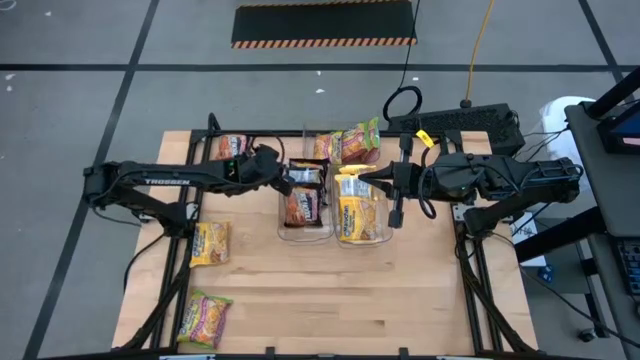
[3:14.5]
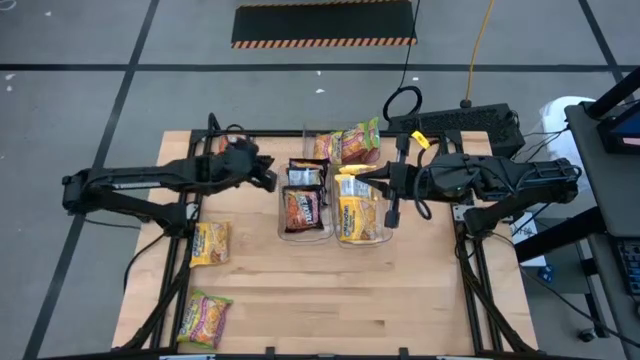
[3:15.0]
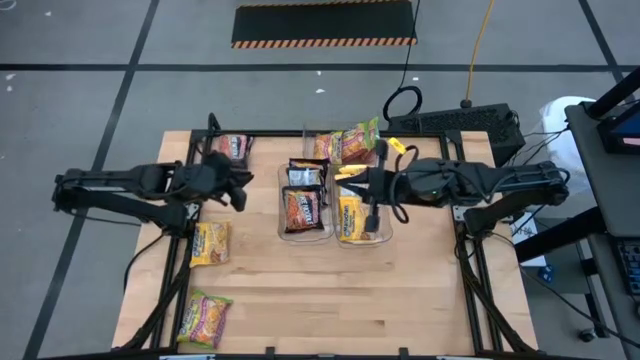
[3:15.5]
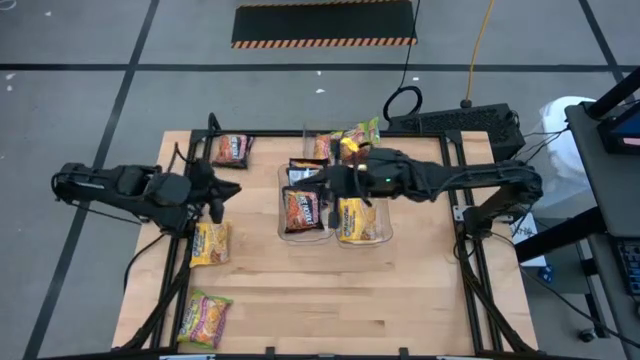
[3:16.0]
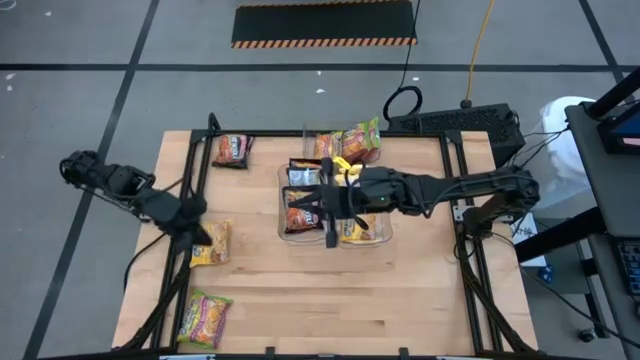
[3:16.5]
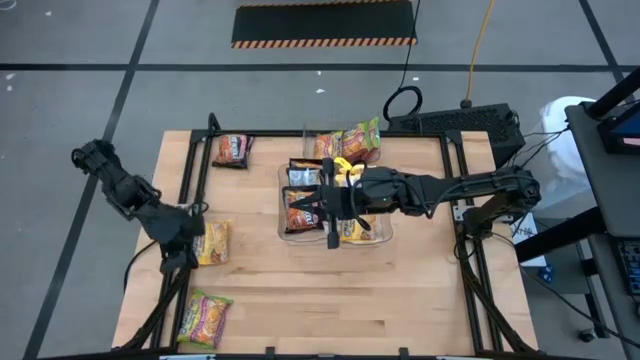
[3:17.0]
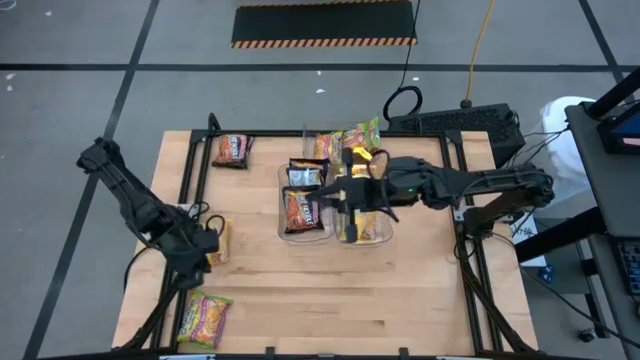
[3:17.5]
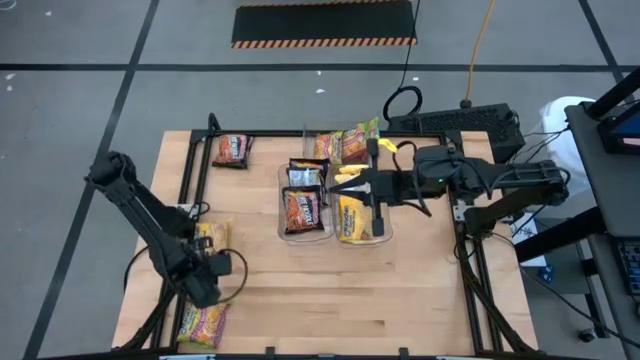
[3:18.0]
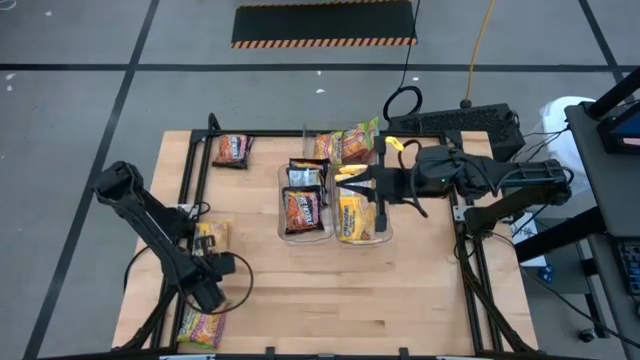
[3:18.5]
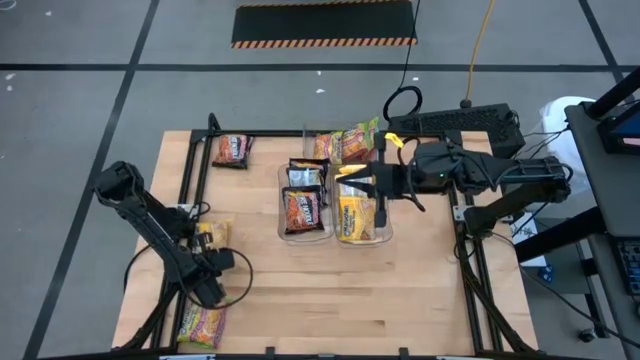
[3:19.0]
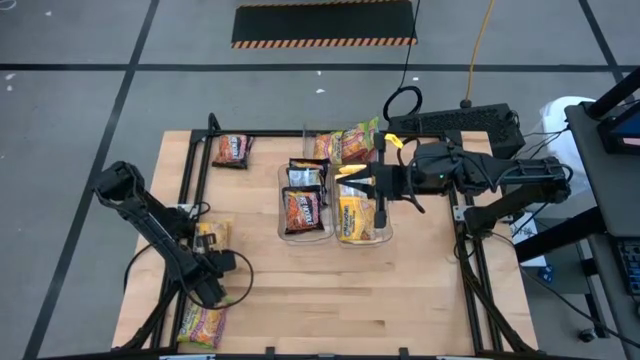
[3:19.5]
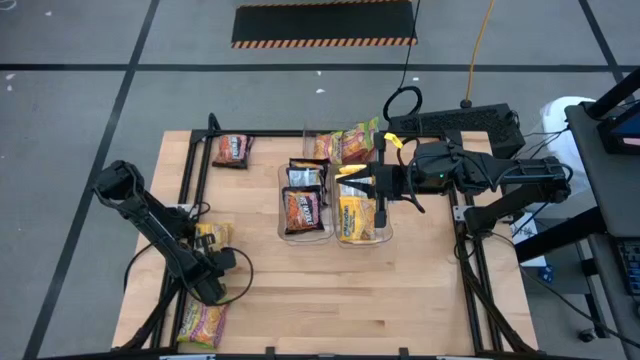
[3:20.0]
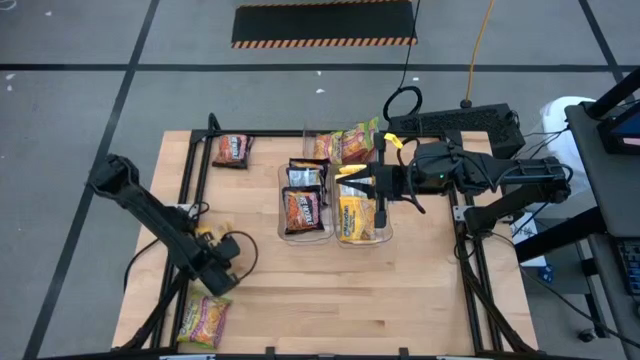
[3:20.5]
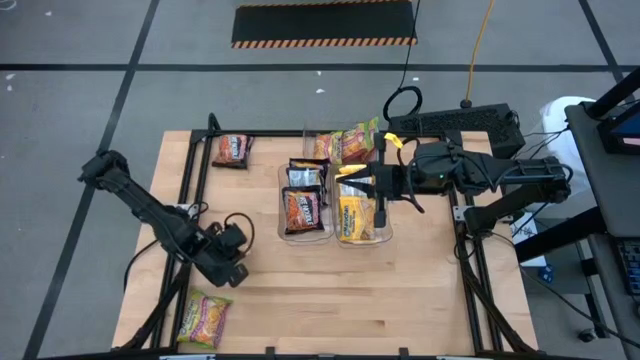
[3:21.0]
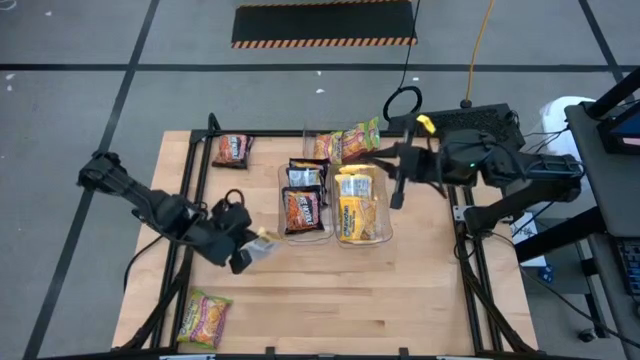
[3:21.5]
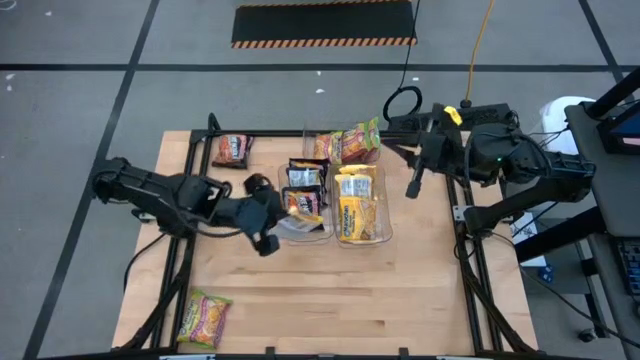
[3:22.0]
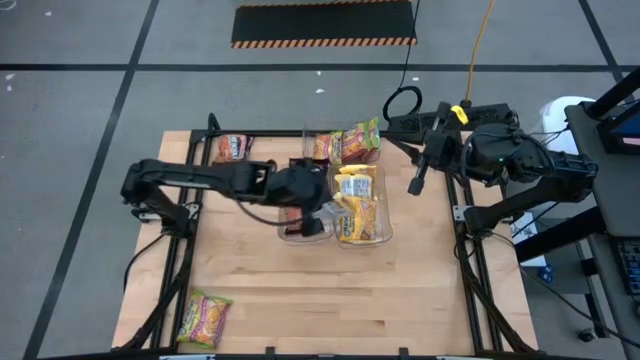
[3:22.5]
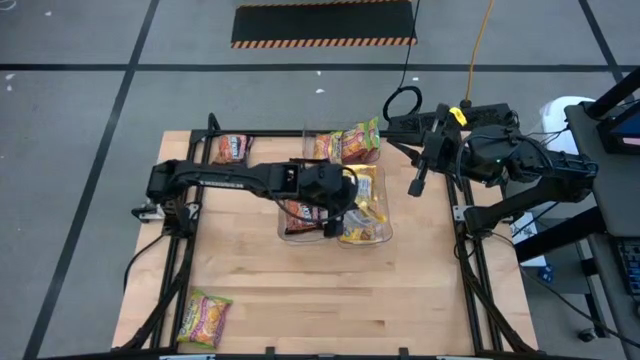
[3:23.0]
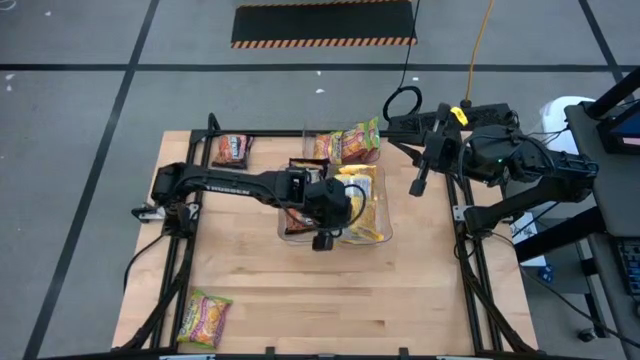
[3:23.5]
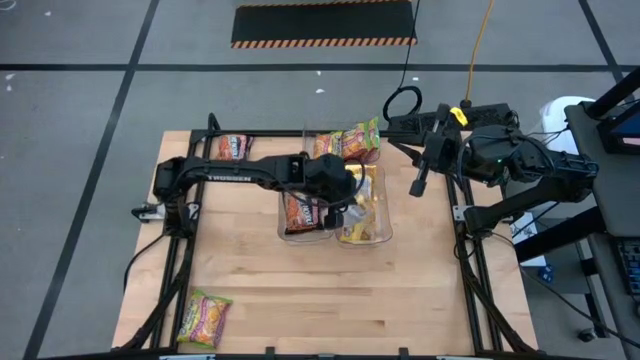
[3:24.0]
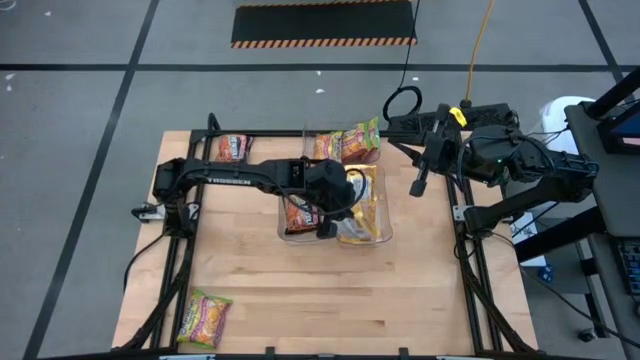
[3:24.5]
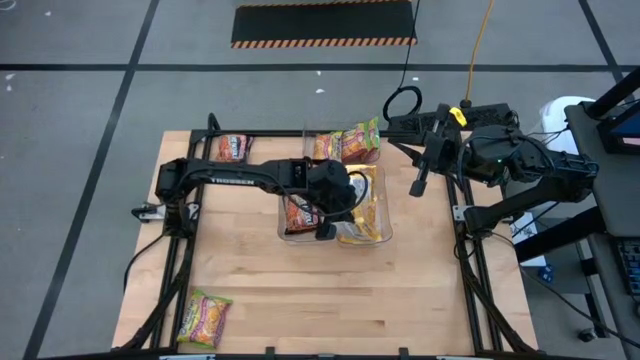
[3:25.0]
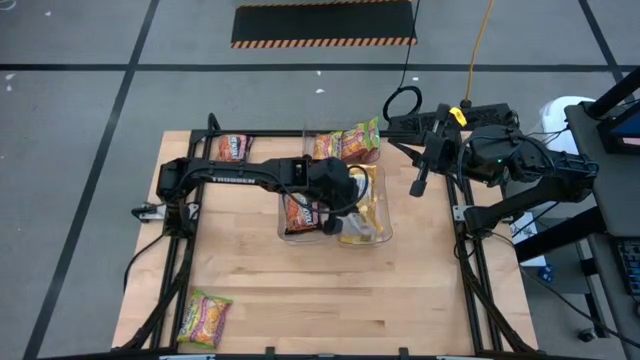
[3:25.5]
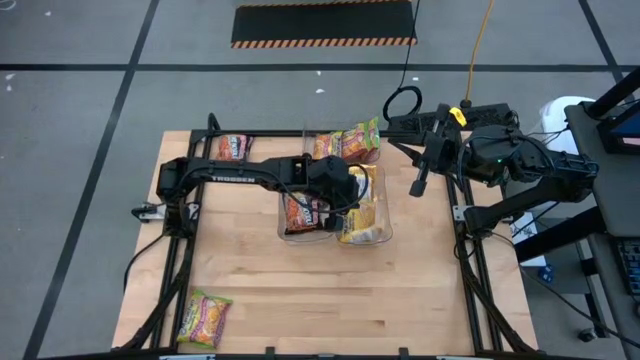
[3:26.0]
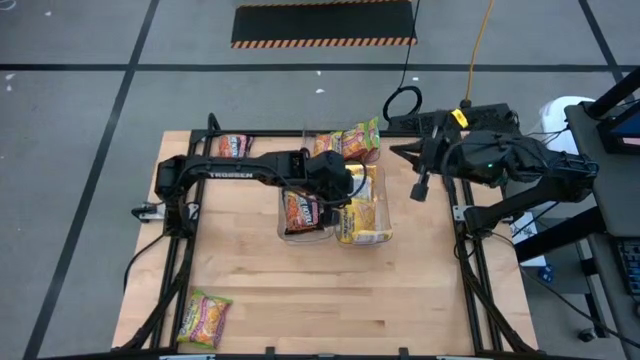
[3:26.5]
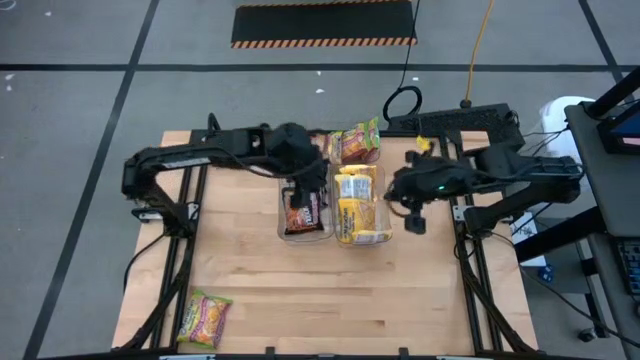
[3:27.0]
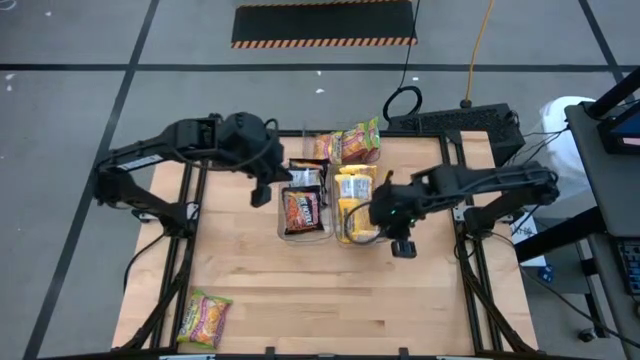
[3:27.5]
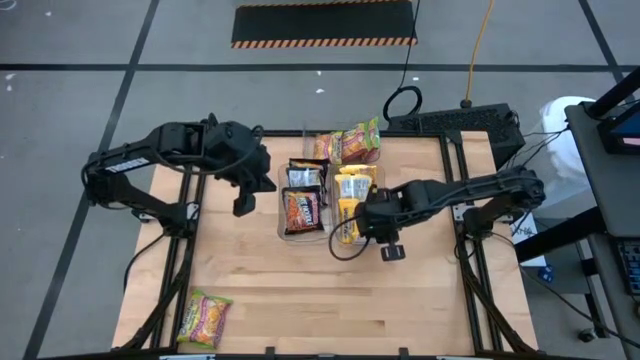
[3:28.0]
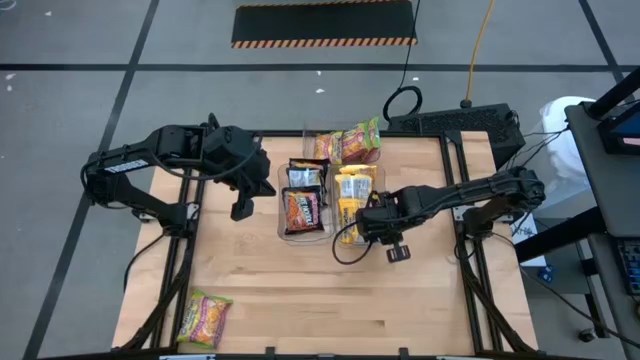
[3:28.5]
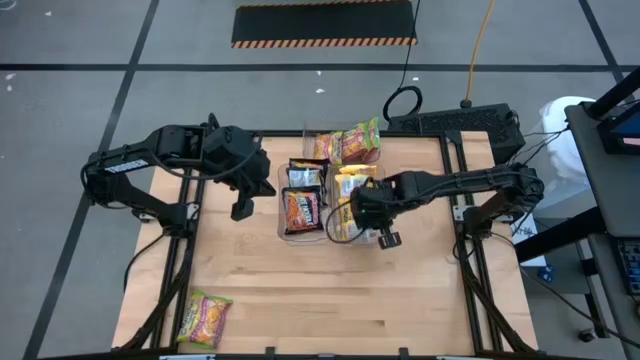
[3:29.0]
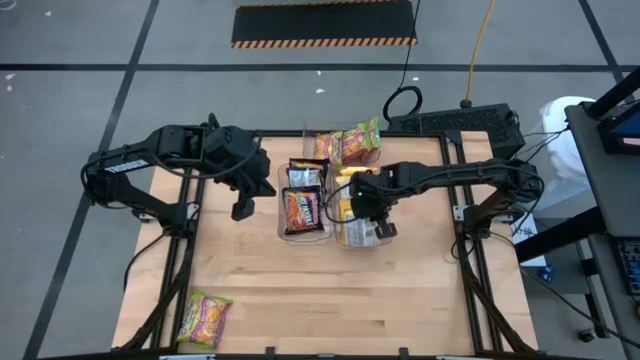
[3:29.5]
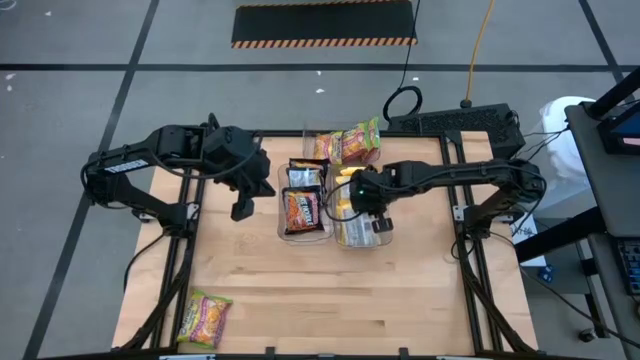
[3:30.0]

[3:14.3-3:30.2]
Task: Sort Maruchan noodles
Put the yellow noodle pack into the right transparent bin

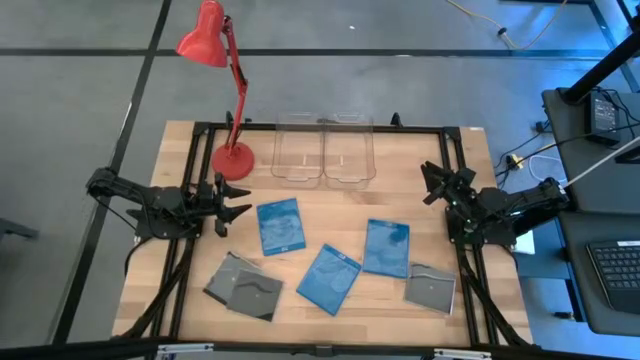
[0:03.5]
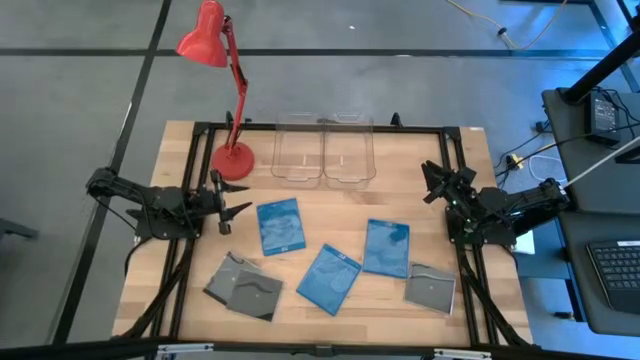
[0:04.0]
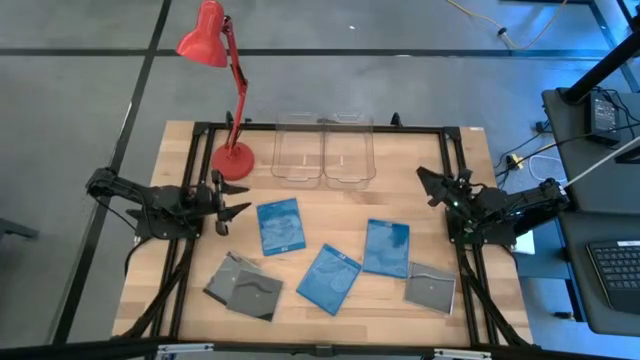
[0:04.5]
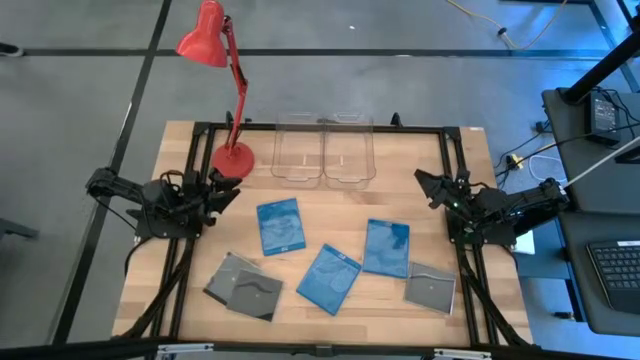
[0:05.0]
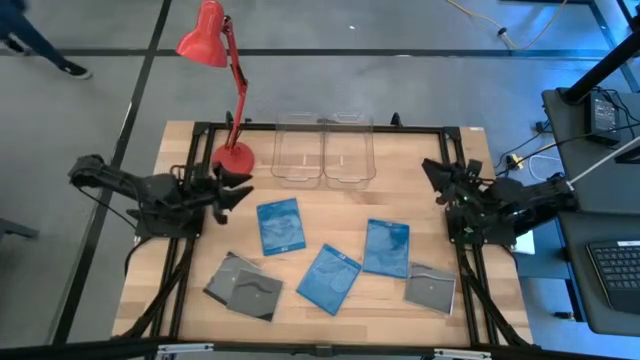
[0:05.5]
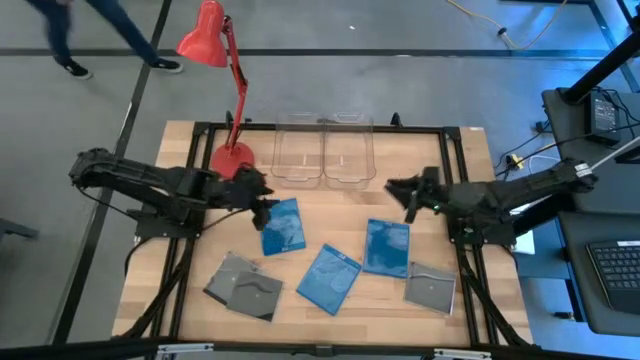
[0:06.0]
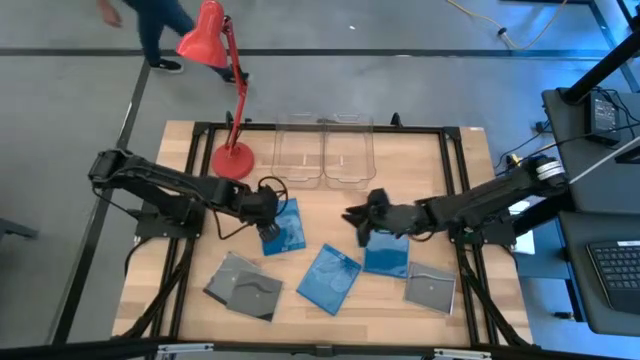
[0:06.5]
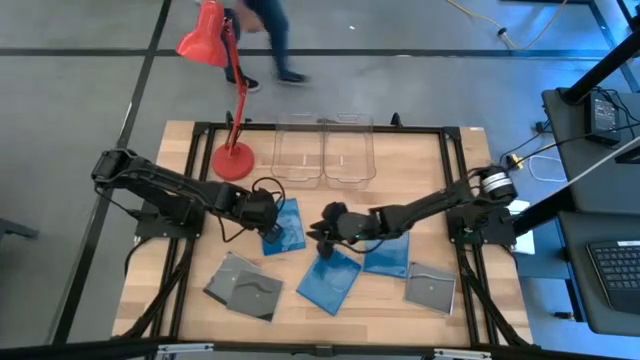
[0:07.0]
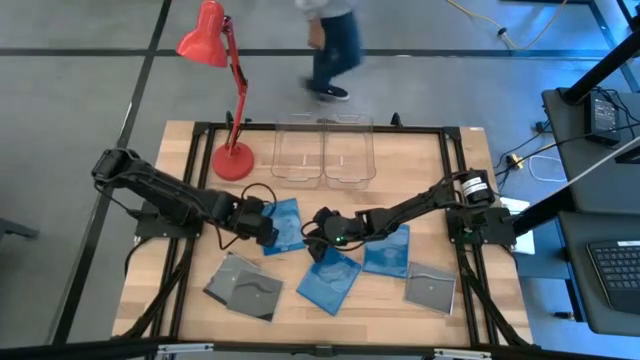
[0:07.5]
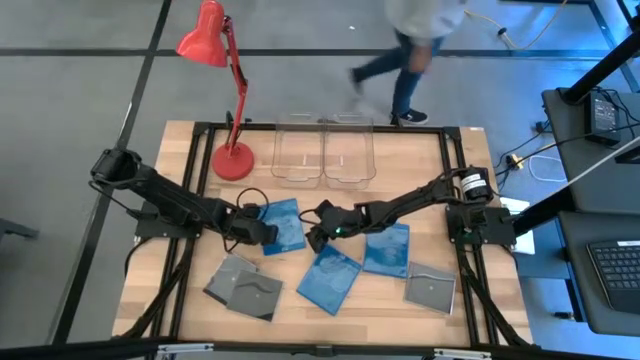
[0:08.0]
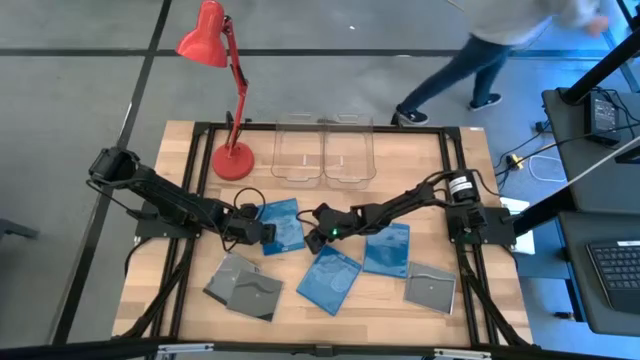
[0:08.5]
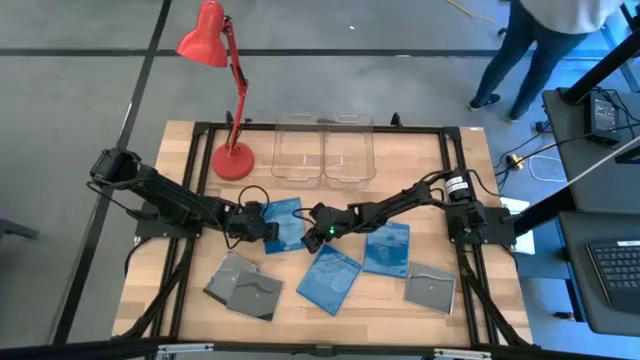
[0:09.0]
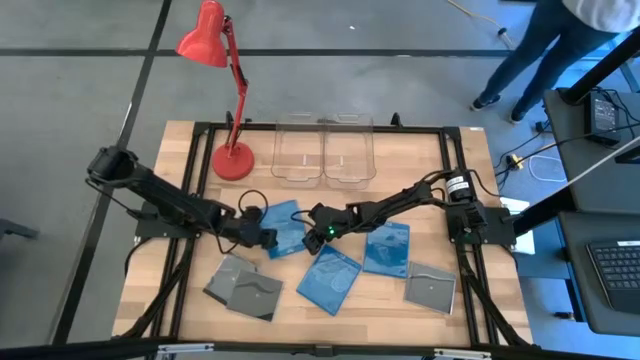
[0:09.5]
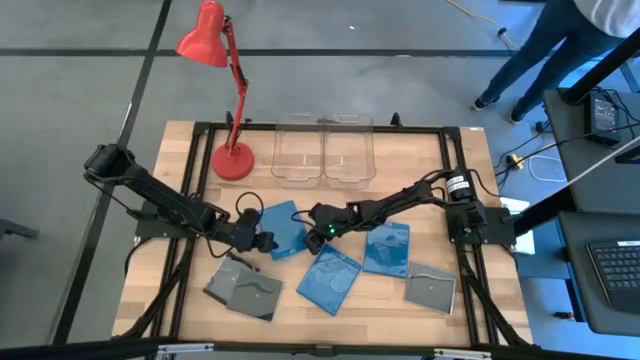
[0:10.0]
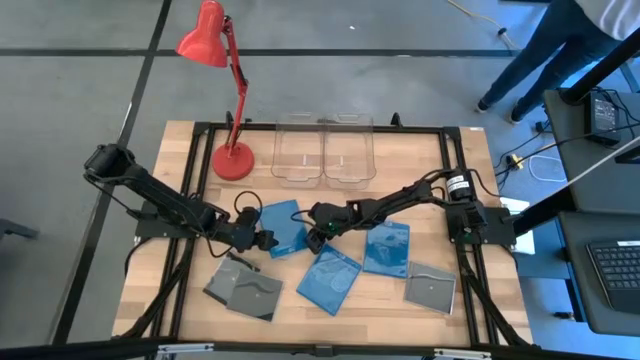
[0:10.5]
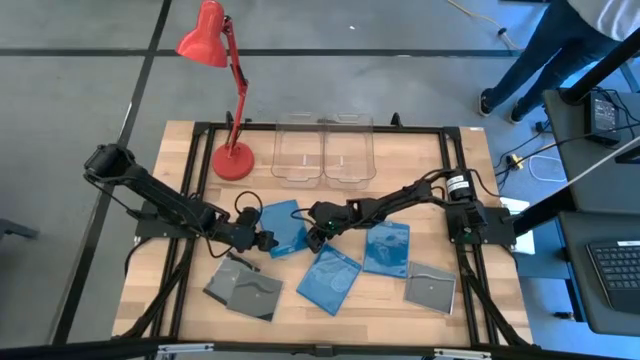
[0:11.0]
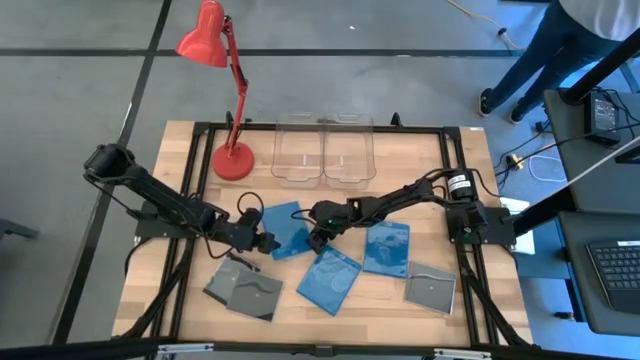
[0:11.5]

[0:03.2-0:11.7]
Task: Pick & place jewel cases by type
Put the left blue CD case into the left transparent bin
